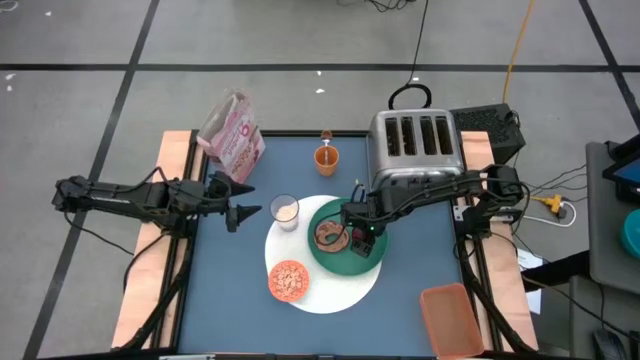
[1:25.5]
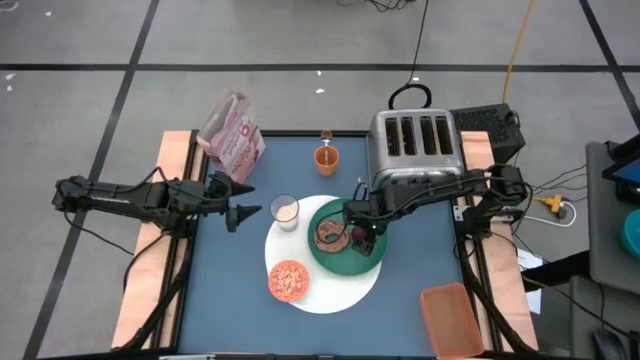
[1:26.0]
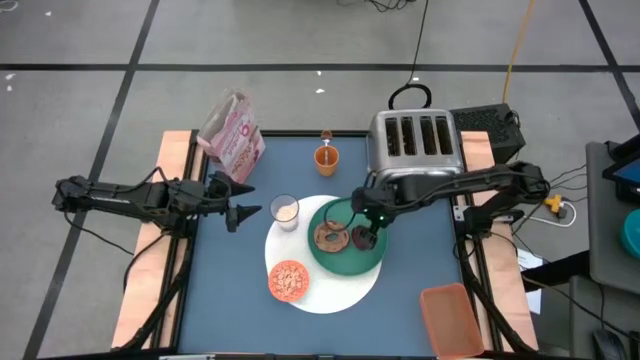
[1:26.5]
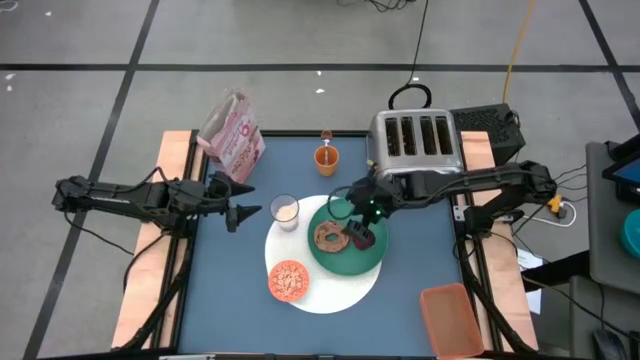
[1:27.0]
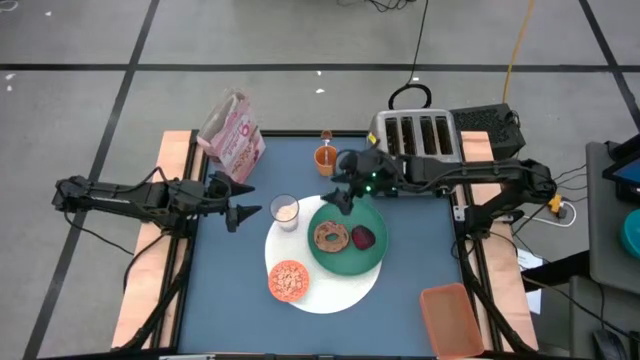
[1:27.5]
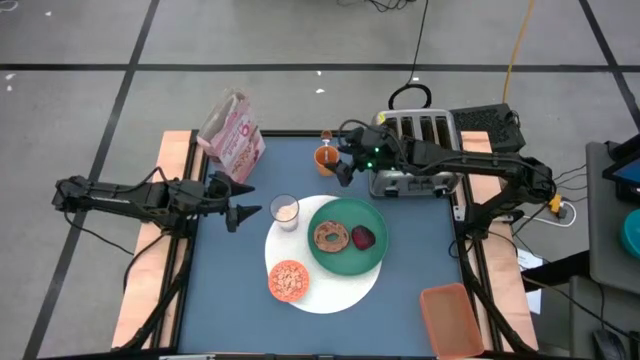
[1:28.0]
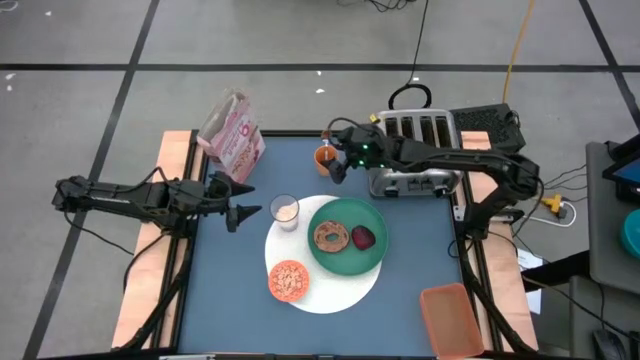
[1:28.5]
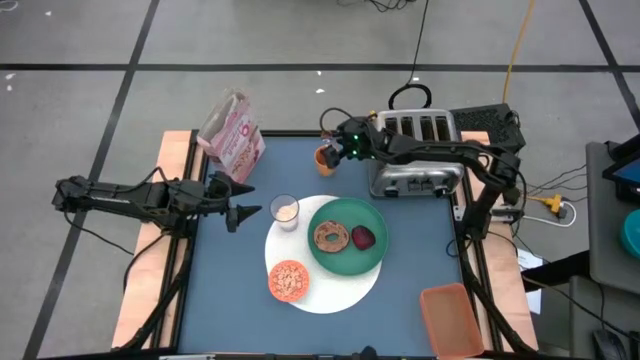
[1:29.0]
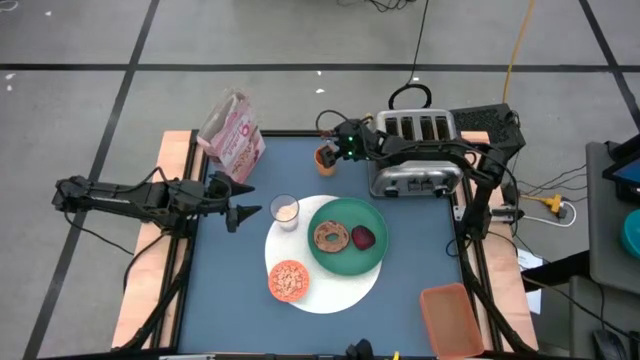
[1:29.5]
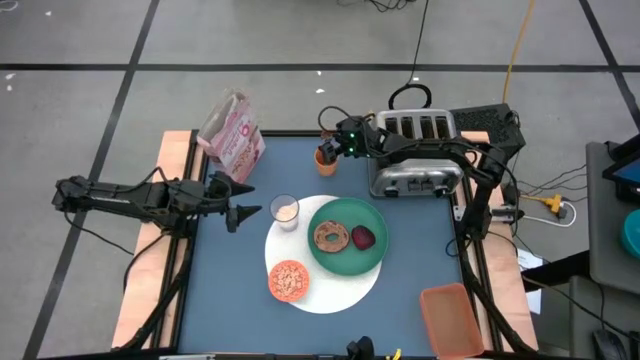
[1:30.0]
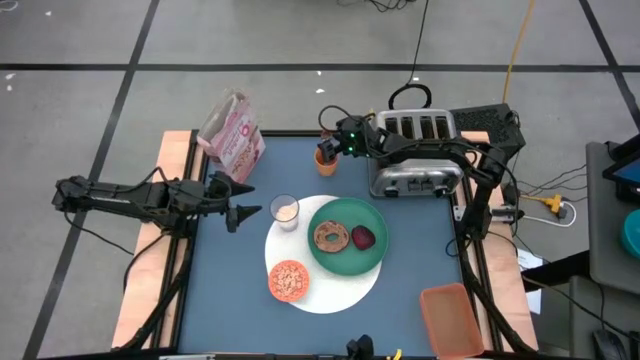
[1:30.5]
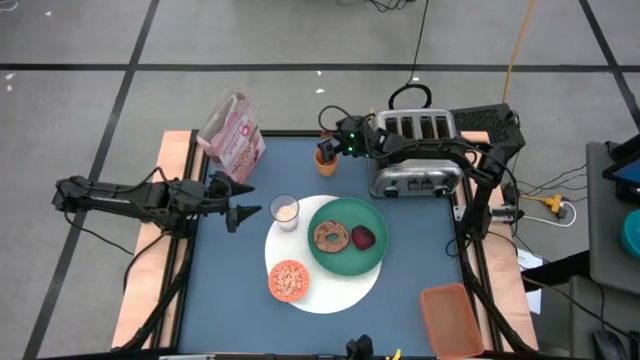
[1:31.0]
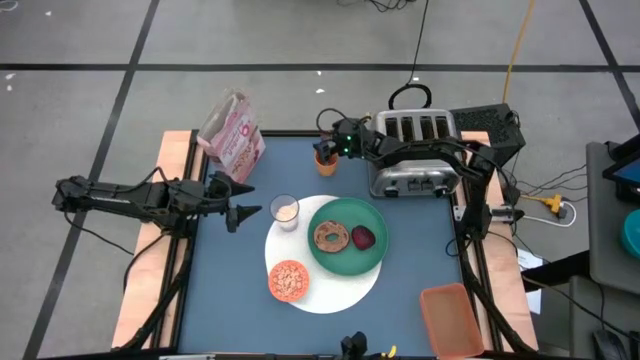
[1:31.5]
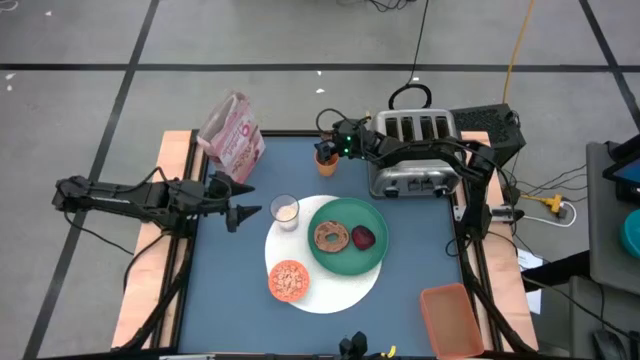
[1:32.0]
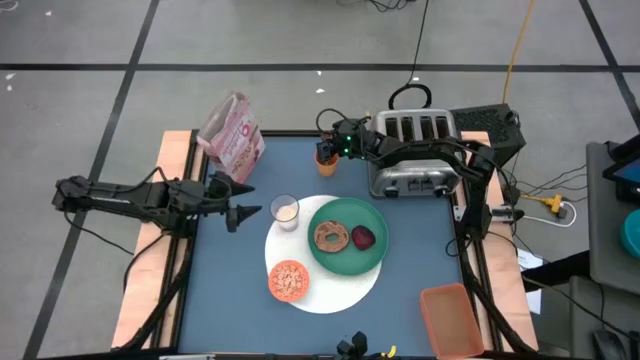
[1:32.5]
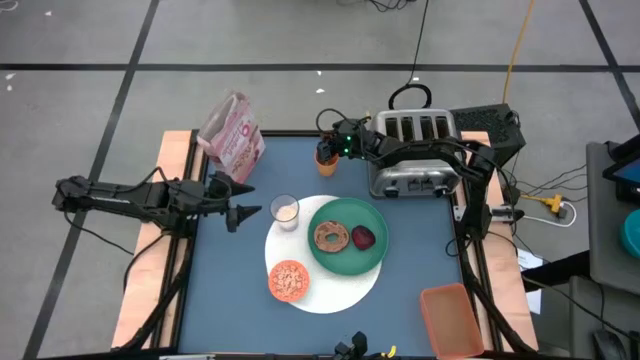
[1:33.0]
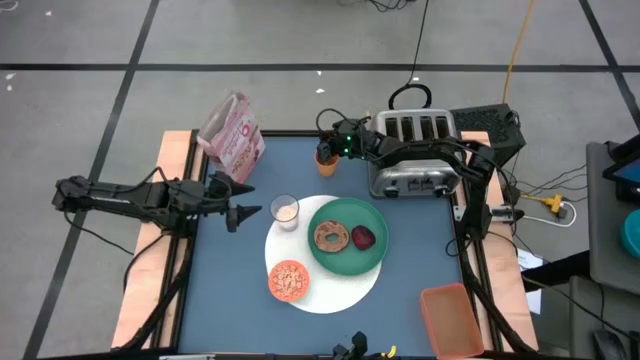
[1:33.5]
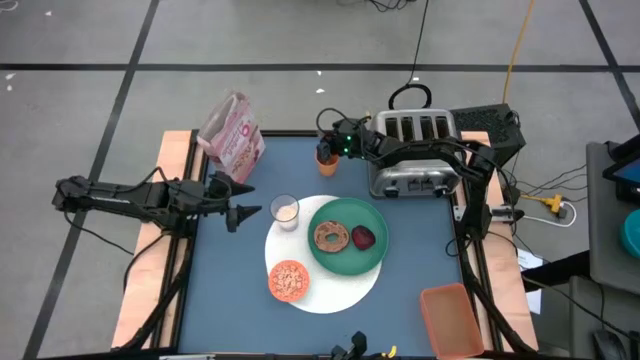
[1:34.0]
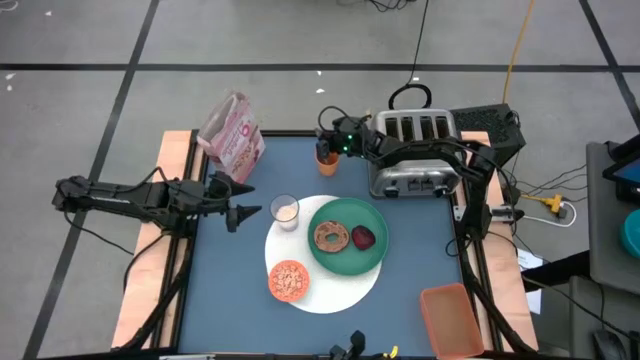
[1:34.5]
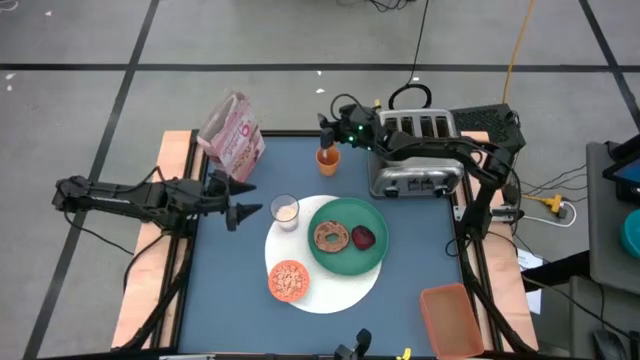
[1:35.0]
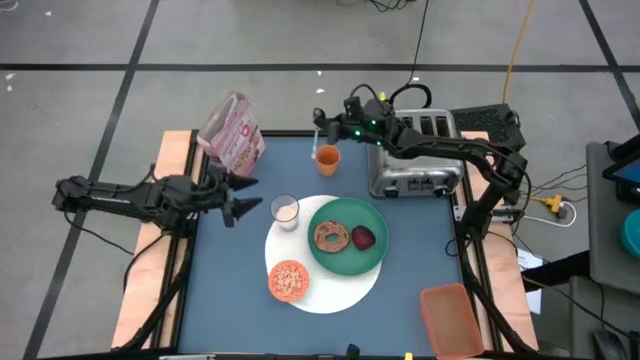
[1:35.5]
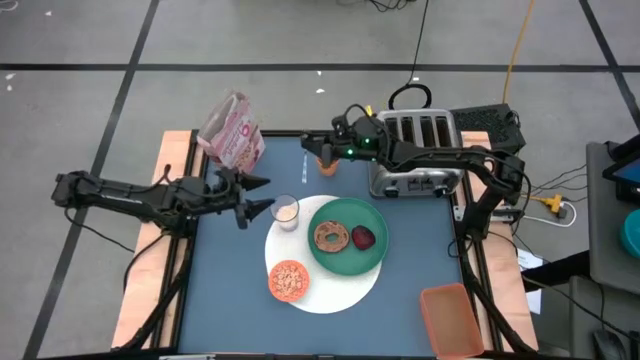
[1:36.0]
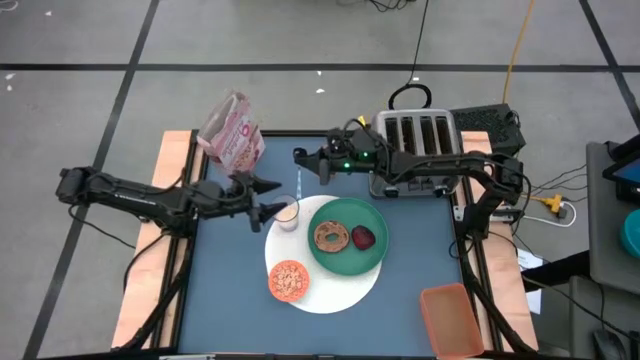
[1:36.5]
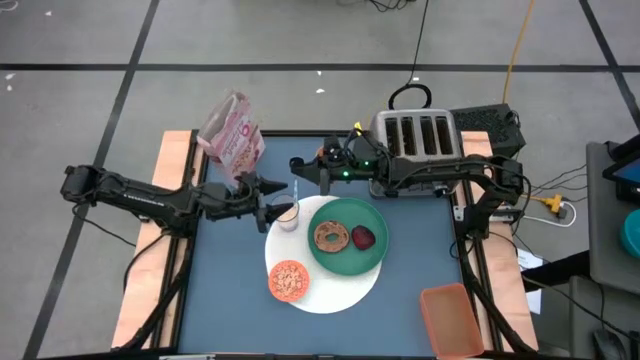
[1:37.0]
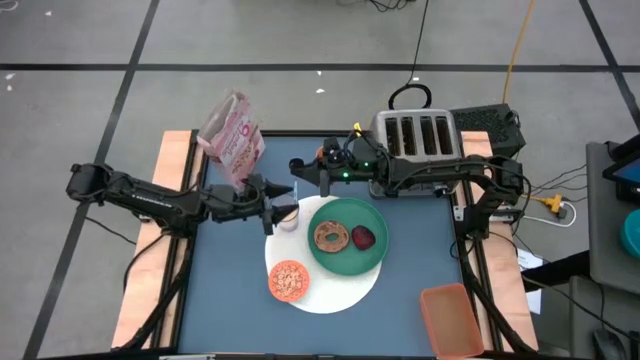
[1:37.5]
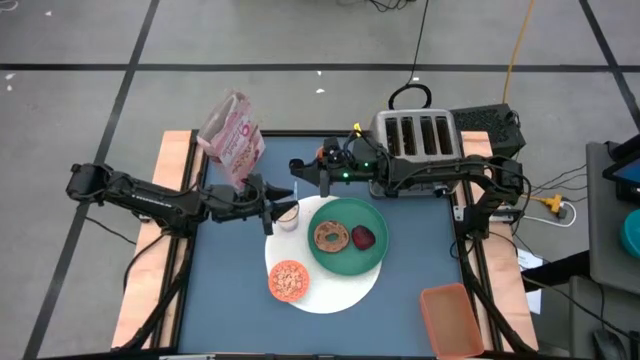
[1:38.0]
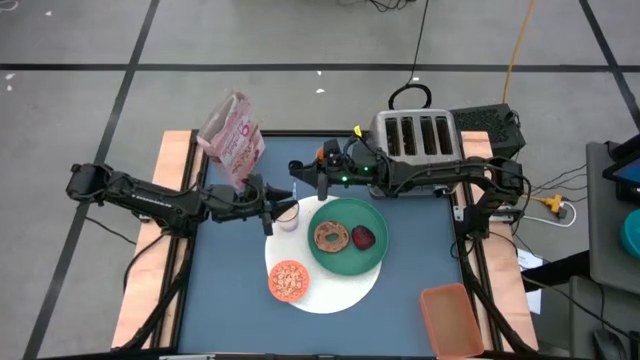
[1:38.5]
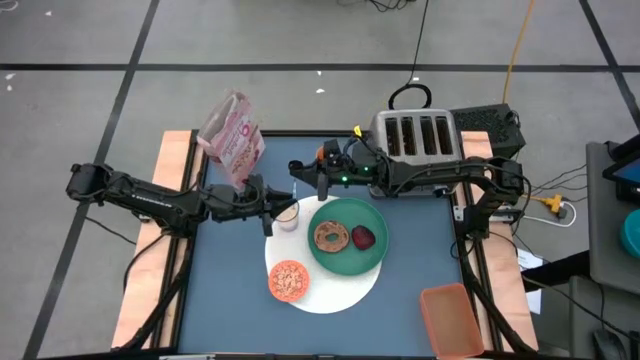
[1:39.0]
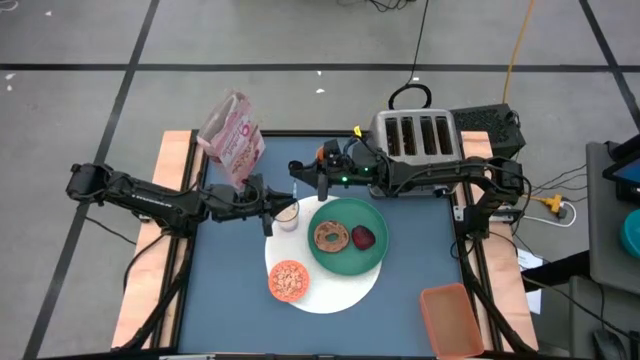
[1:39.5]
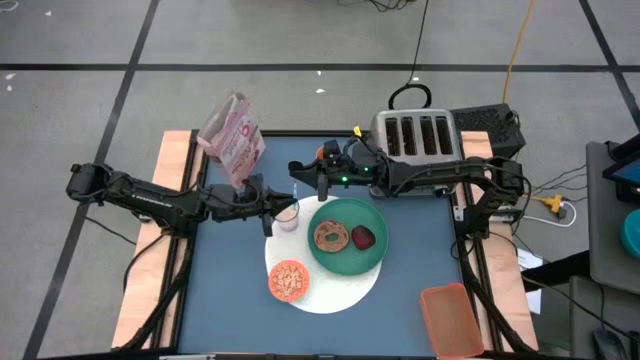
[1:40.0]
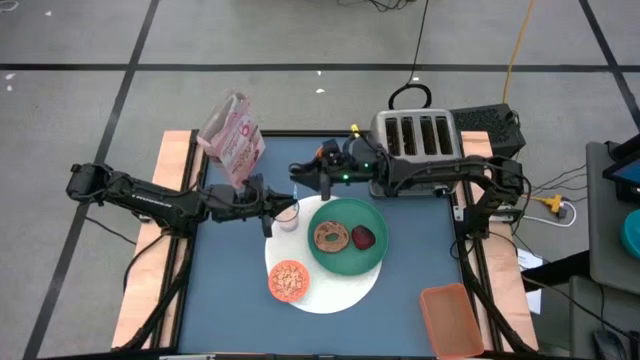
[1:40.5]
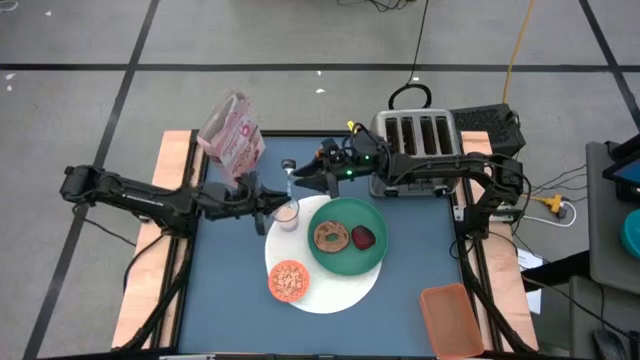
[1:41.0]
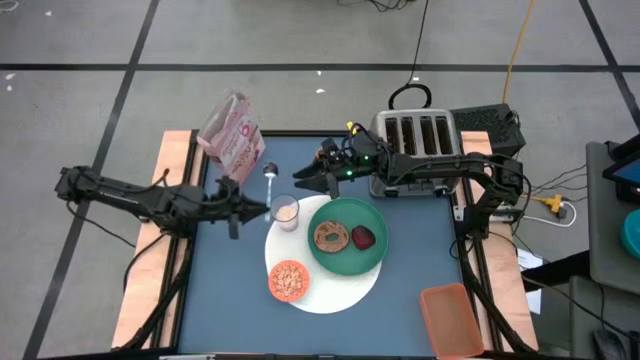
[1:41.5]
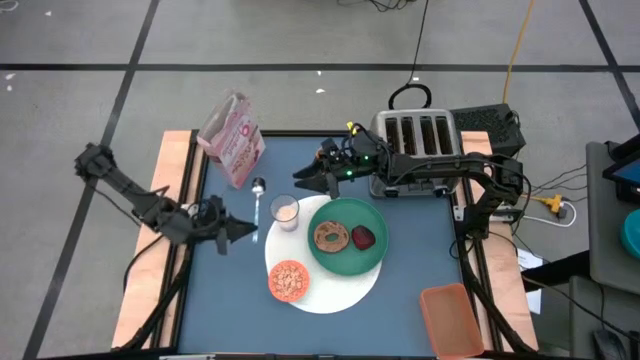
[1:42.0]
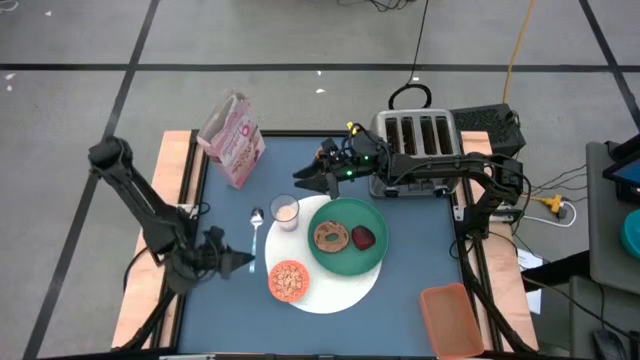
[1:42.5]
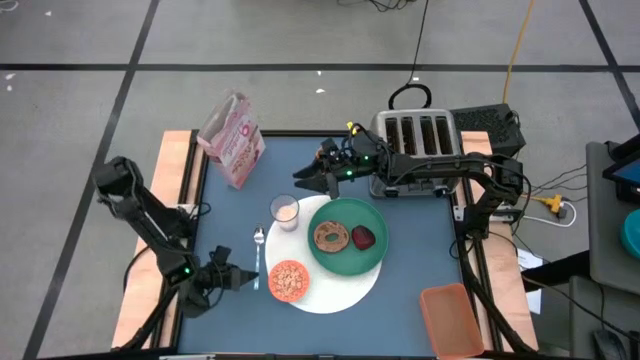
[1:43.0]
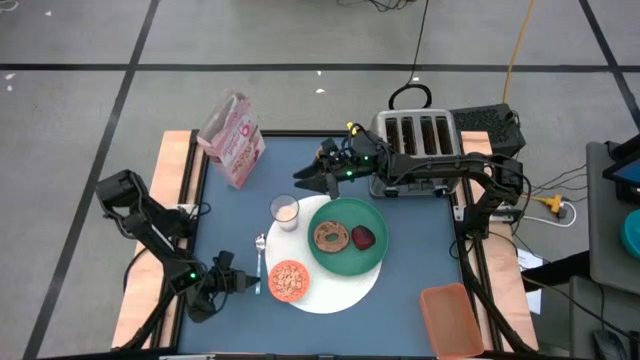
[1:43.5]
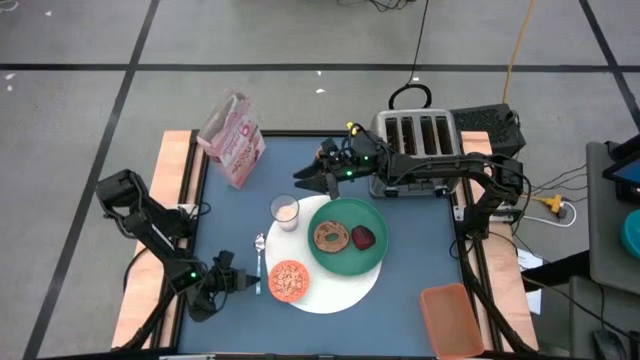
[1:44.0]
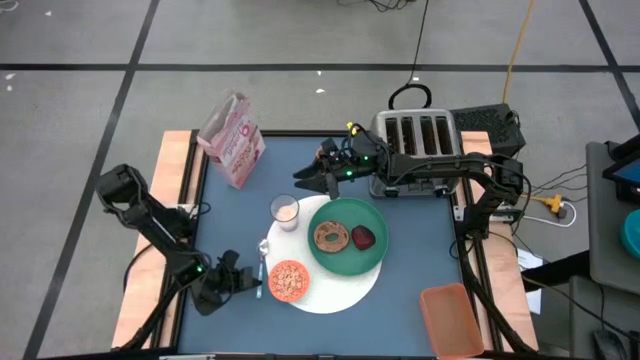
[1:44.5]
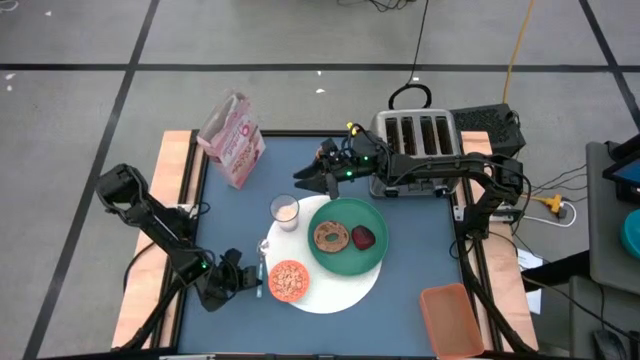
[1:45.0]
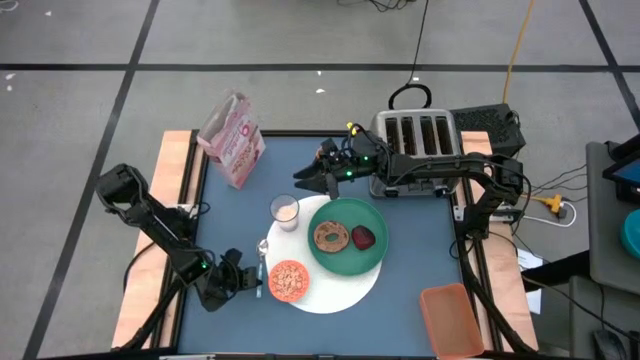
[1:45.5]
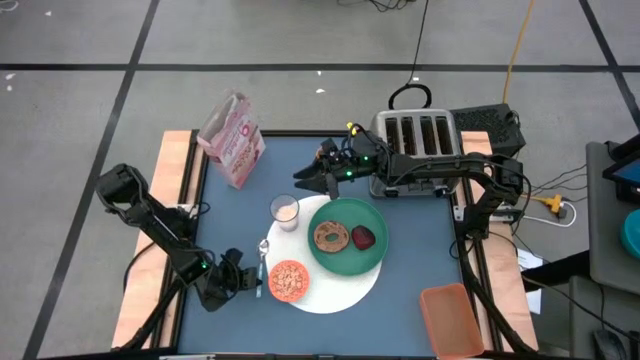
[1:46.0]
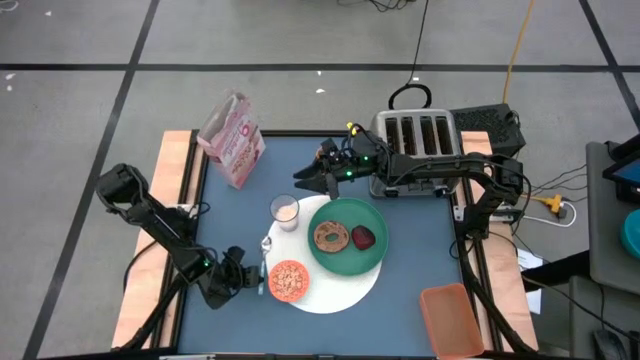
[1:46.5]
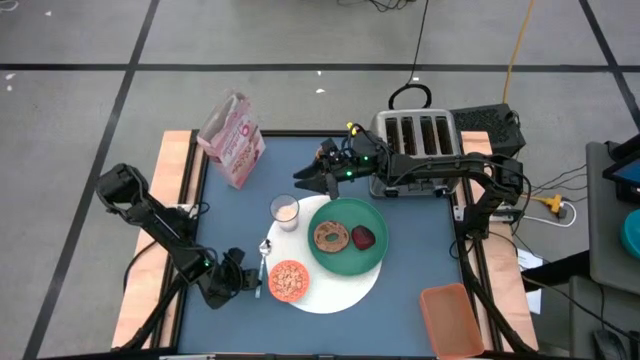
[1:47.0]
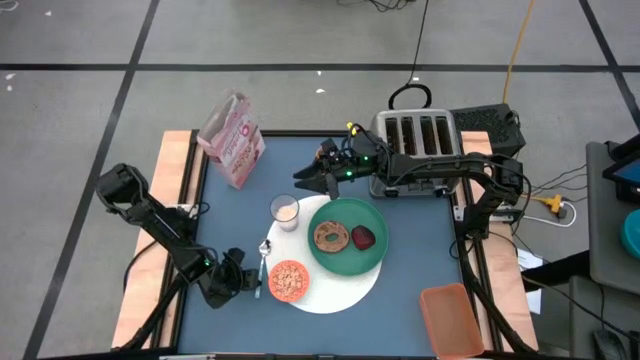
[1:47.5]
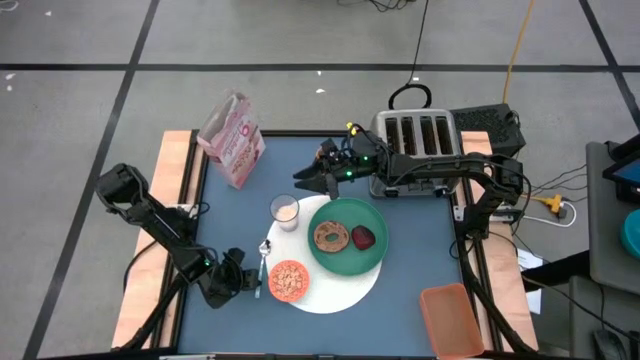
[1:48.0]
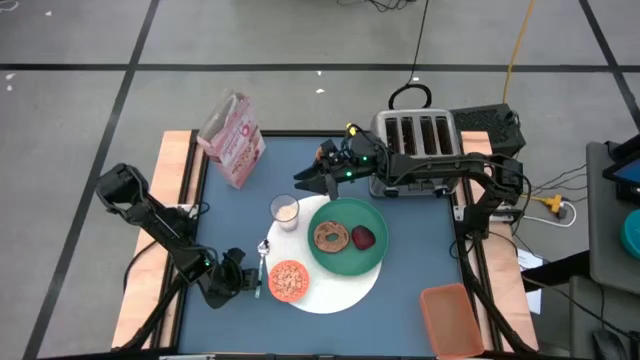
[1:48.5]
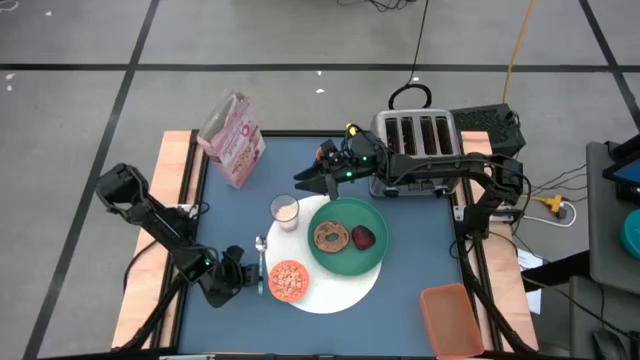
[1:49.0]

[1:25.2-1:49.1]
Task: Arrange a breakfast setting
Put the green patterned spoon beside the table mat
